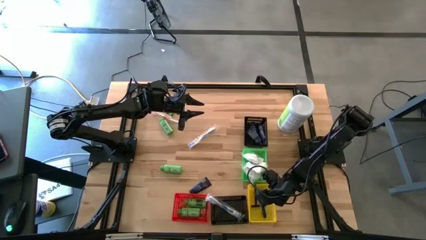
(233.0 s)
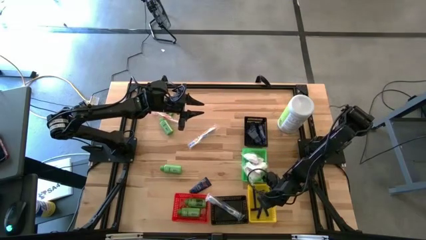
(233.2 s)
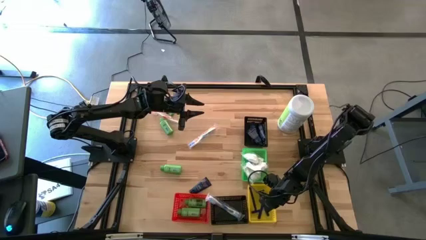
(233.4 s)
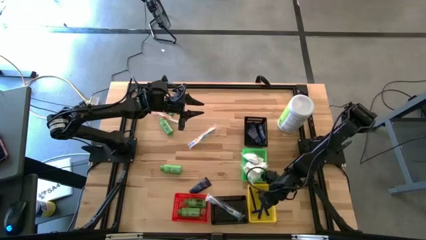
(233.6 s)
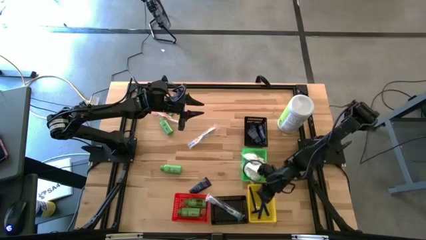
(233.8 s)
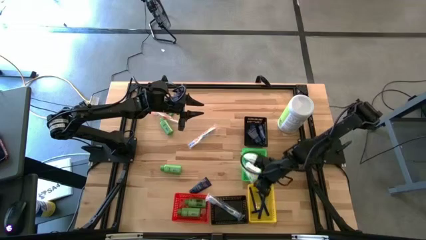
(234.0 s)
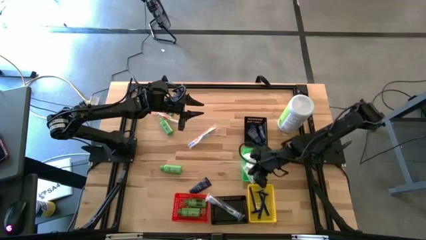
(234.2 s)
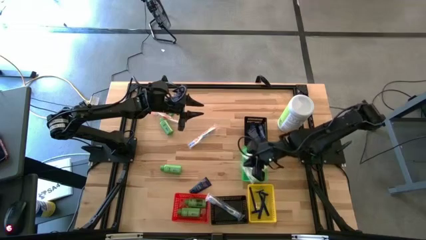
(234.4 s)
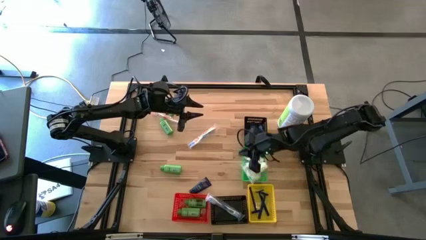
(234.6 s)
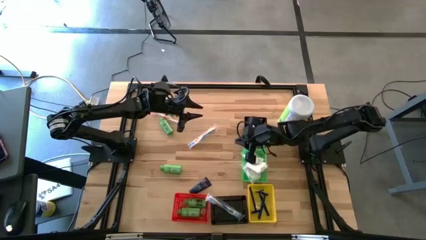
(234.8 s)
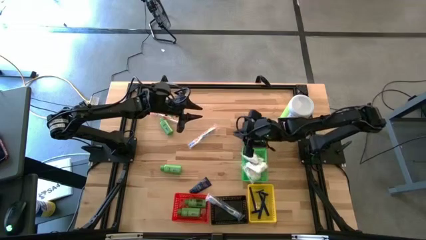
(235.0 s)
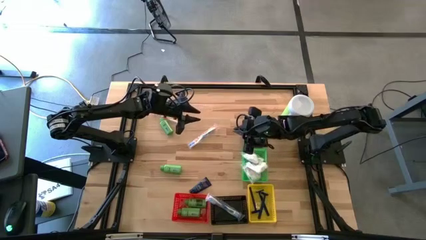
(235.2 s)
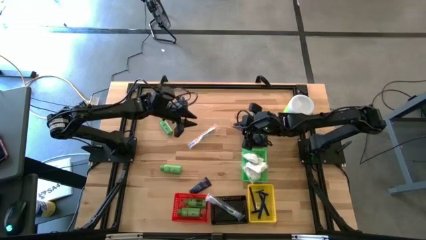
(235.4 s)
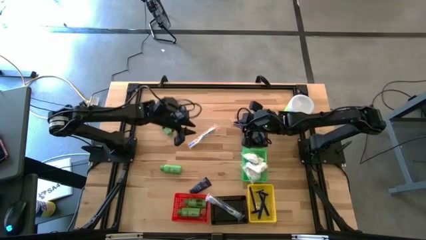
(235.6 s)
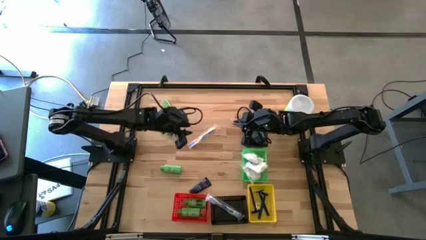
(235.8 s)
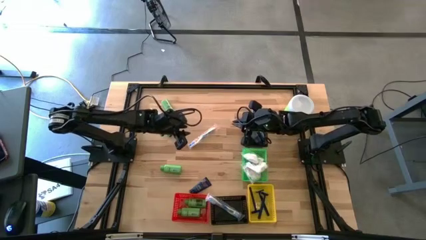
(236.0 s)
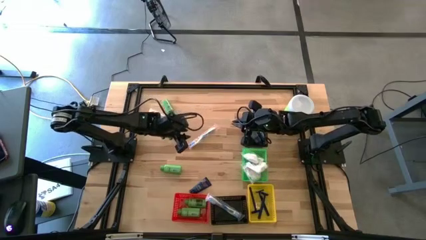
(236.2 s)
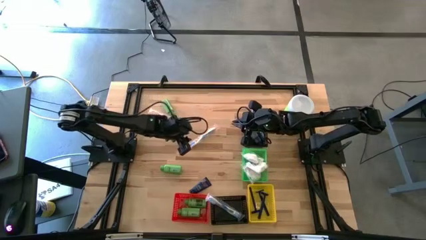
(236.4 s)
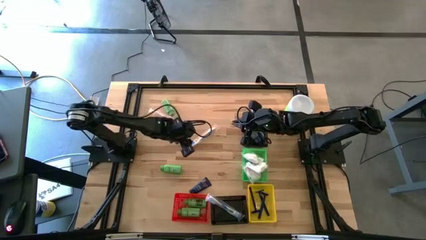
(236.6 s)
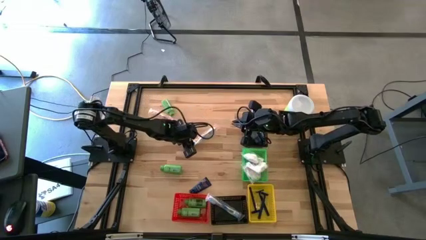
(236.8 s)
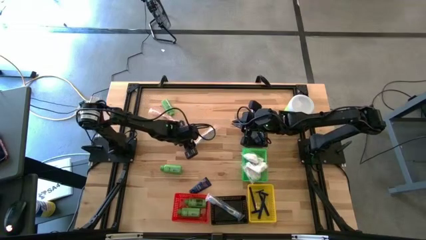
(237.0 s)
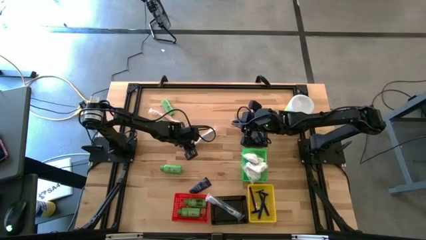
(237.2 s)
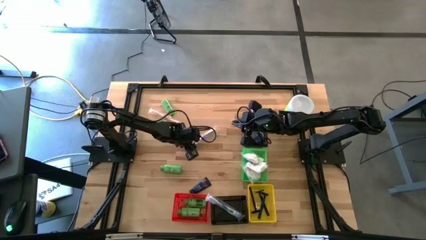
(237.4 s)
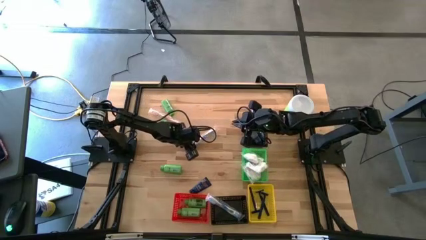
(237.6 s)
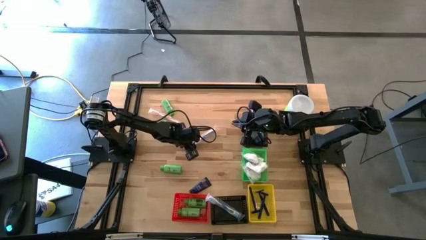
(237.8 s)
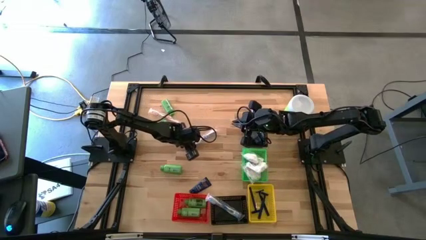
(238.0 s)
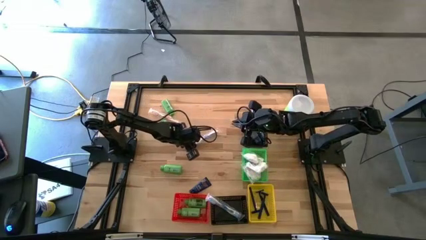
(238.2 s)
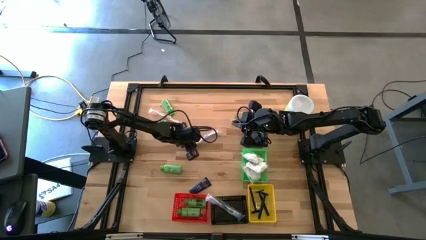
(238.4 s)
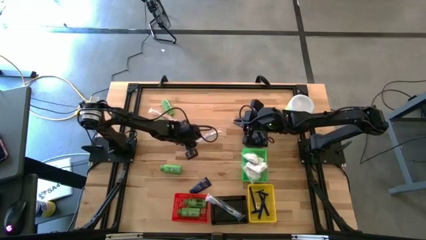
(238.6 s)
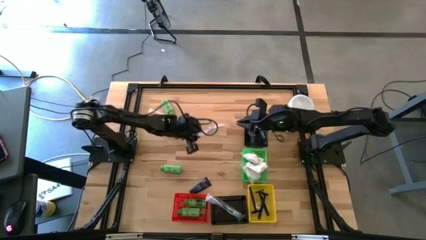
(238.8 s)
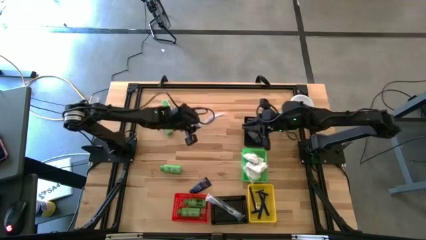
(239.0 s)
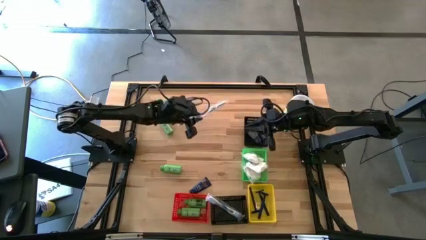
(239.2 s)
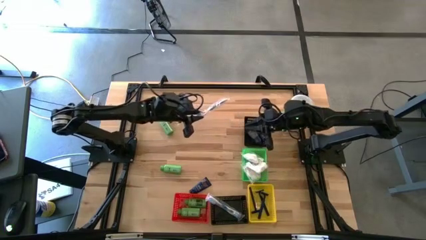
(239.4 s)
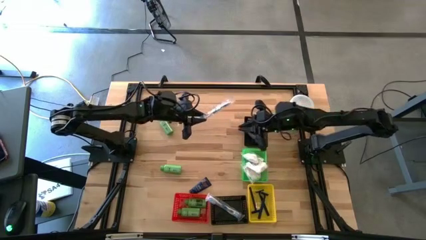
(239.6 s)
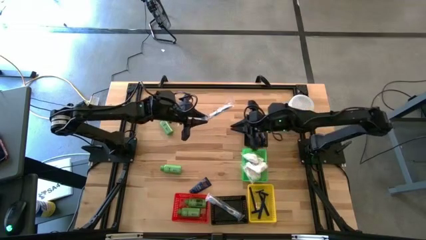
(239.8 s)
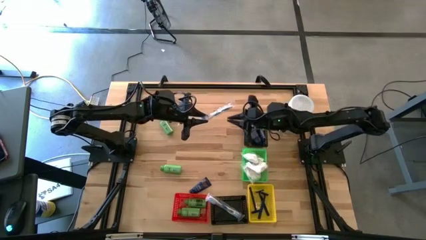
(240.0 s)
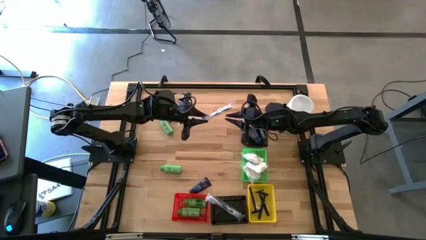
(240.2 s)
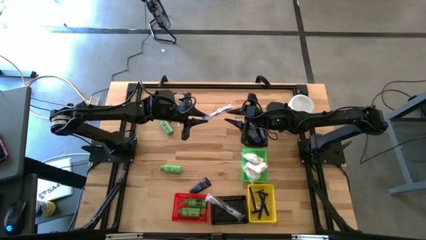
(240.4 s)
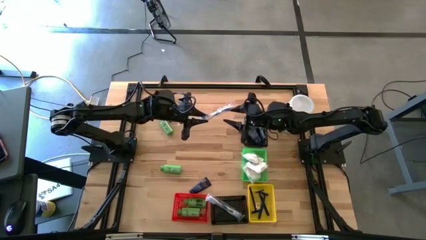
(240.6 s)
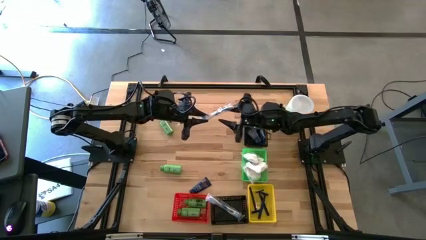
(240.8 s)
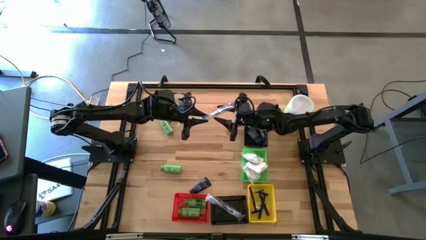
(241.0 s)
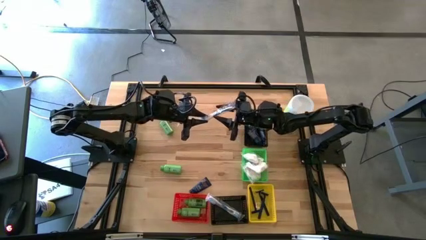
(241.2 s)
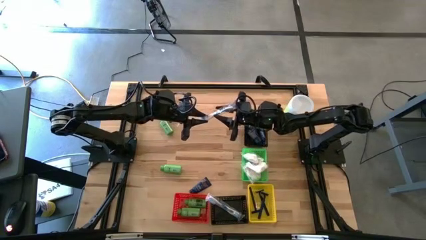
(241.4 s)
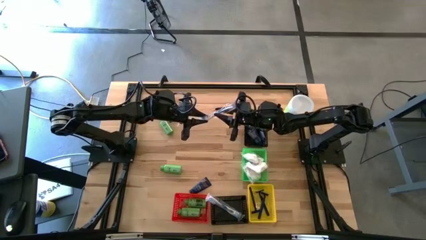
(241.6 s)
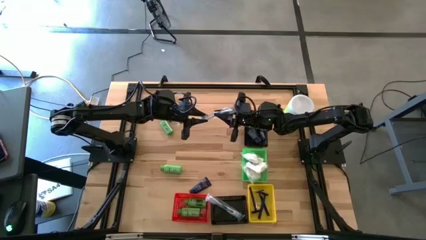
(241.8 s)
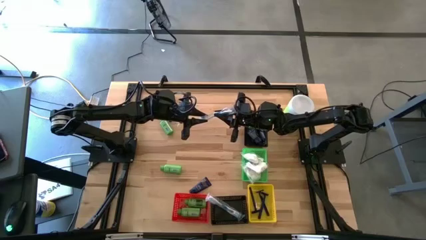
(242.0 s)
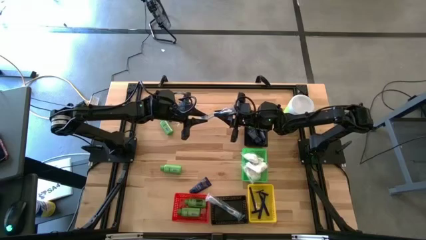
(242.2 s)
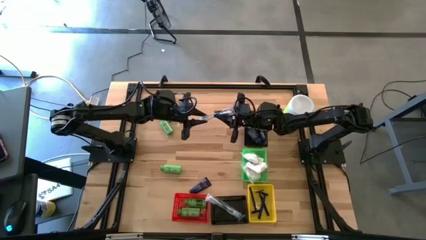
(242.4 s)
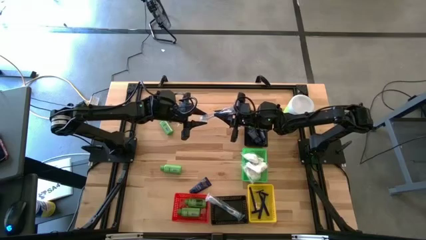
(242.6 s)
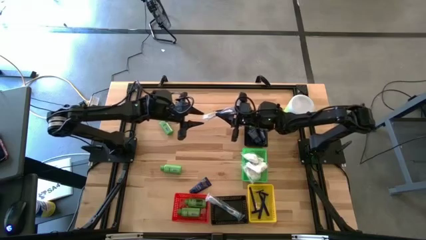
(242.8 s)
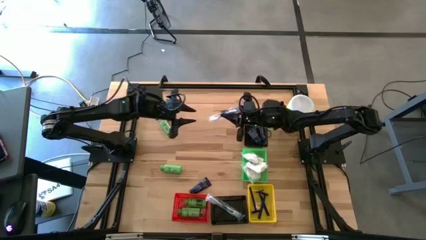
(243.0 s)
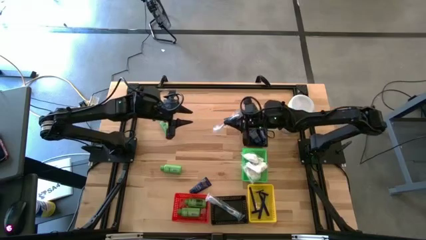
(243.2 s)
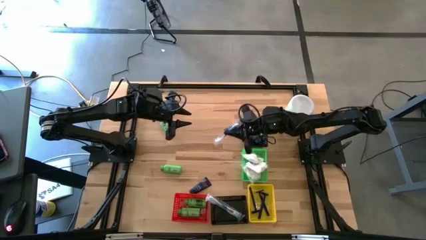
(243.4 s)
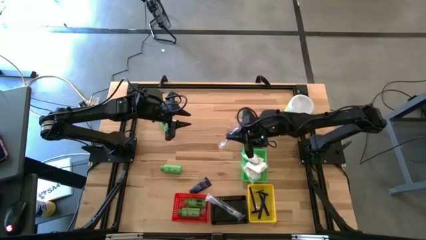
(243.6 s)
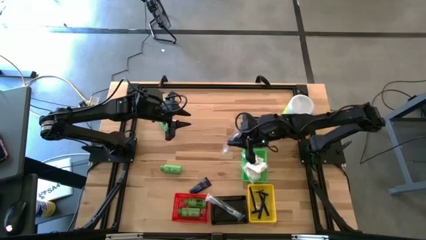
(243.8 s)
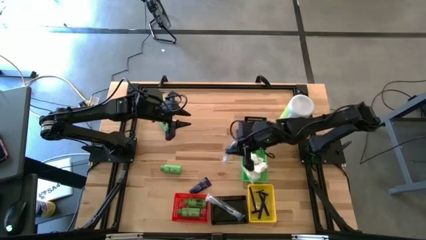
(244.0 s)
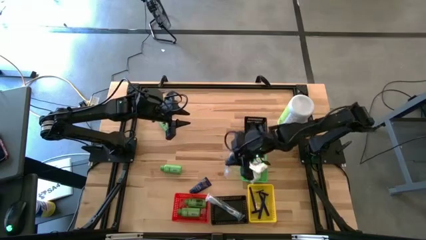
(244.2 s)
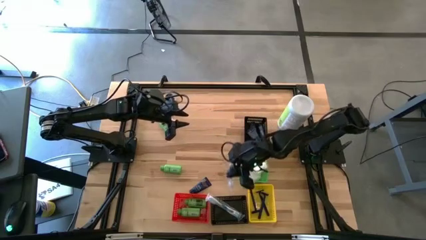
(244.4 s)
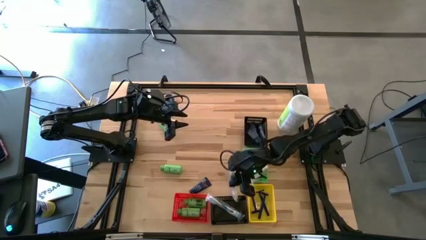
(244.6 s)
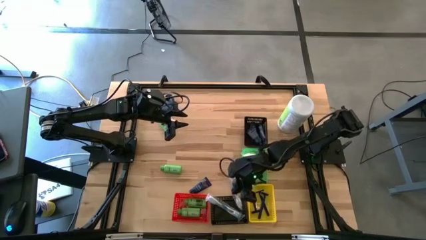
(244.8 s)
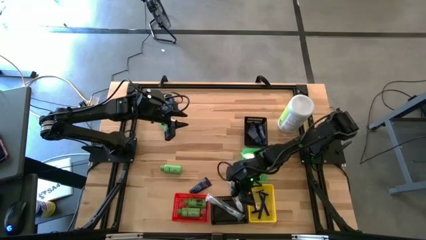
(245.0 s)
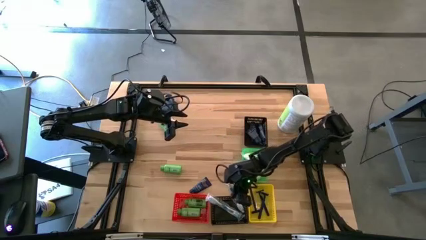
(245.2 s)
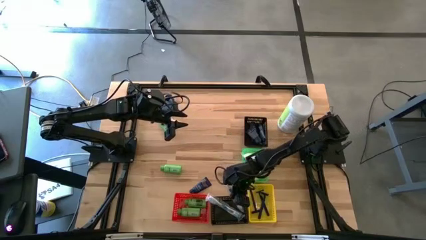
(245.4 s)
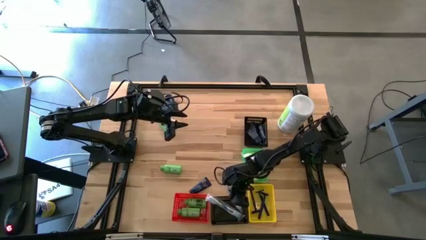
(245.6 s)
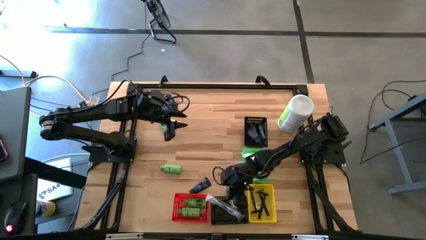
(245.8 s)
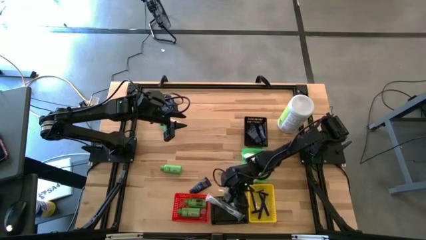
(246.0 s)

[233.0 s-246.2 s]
Task: Pick & Place Travel size toiletries
Put the blue toothbrush into the bottom black bin

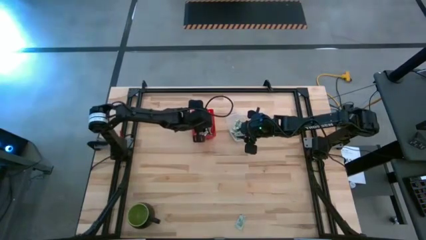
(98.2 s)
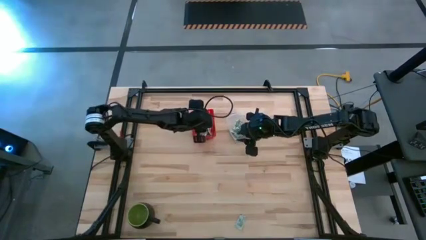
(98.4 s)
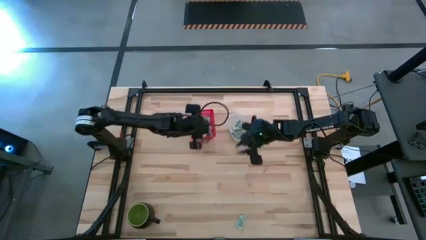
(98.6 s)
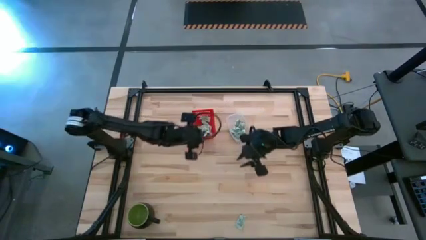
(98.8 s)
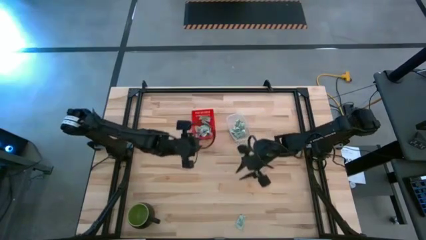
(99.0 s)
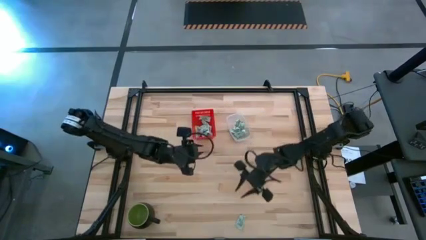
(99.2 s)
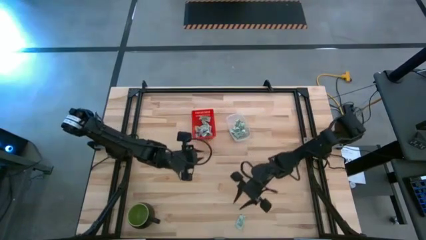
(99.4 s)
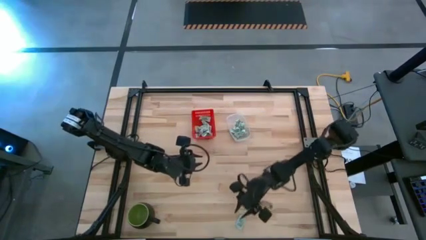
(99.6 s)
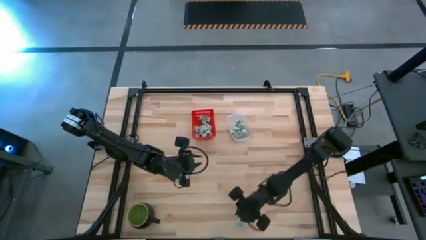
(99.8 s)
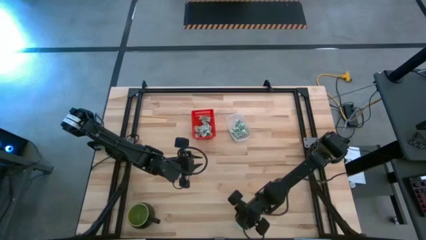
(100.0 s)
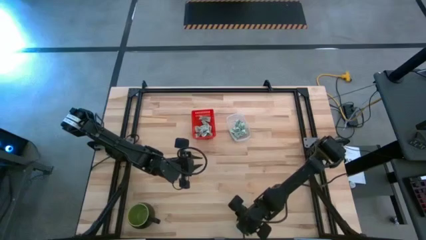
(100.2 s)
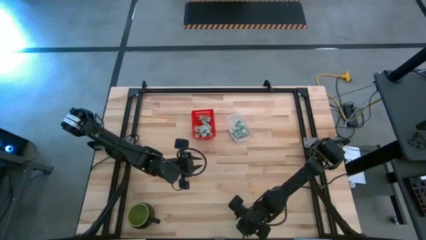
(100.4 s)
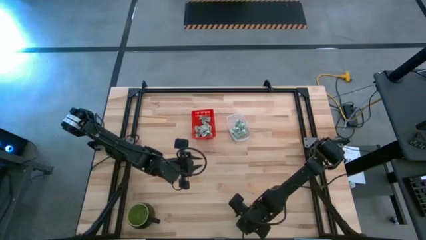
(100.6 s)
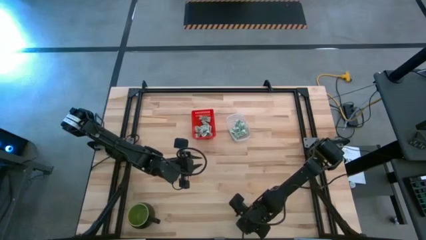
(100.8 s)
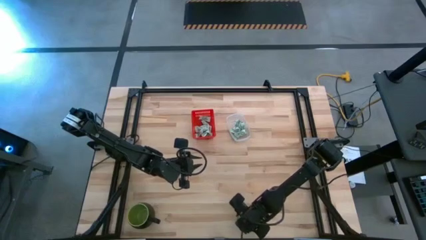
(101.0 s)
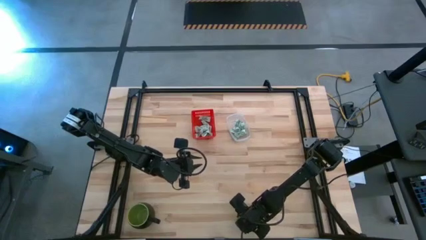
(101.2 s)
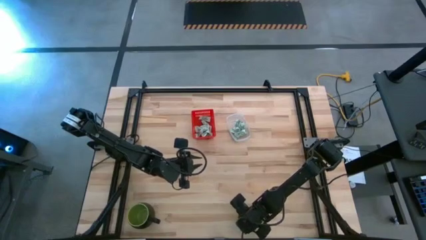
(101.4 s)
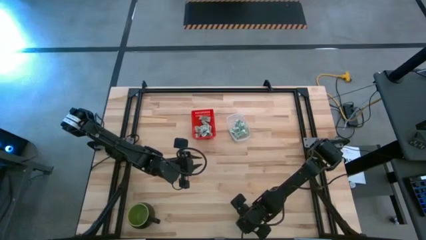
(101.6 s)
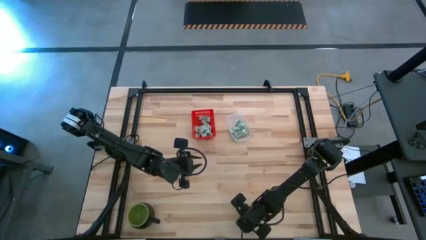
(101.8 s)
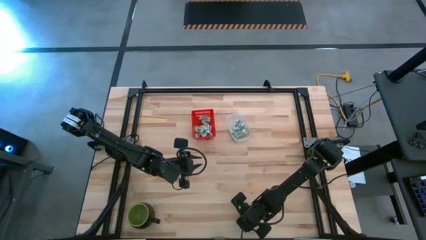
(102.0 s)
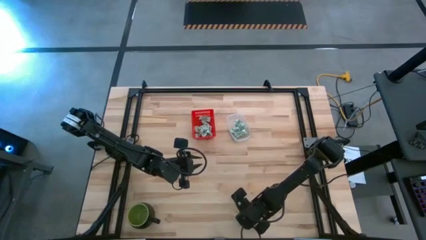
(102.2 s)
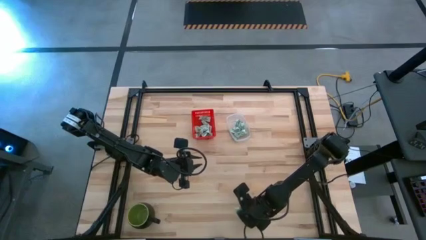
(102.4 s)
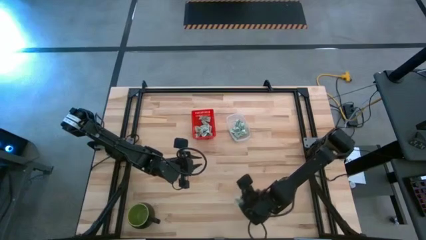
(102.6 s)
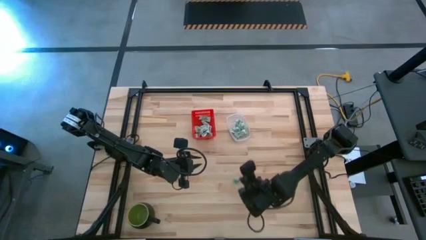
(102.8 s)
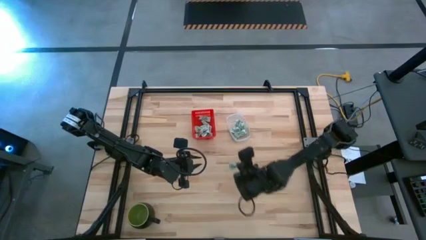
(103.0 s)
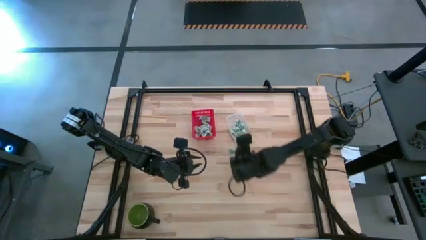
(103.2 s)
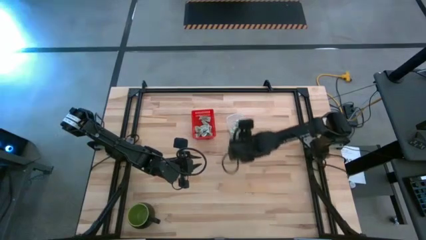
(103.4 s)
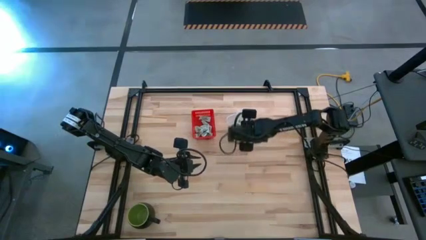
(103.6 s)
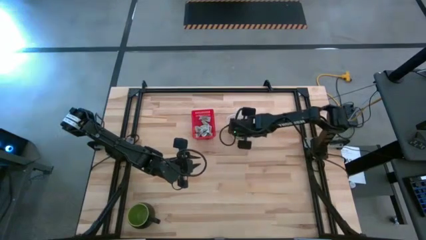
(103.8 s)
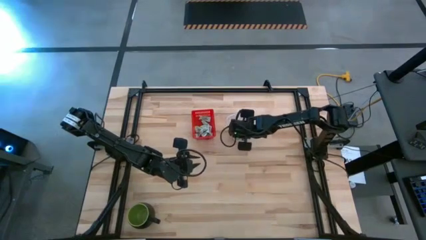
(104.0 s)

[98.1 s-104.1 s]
Task: Pick and place items into bin
Put the white stevia packet into the transparent bin
